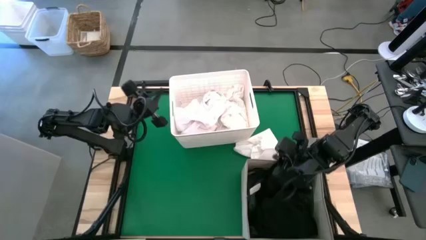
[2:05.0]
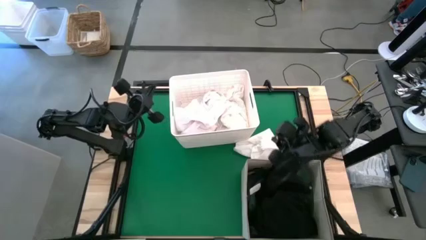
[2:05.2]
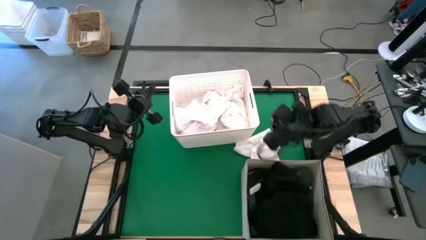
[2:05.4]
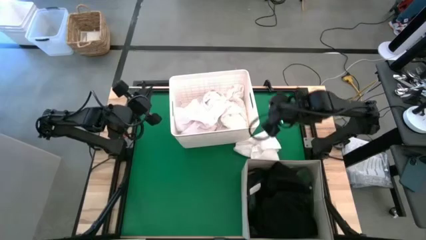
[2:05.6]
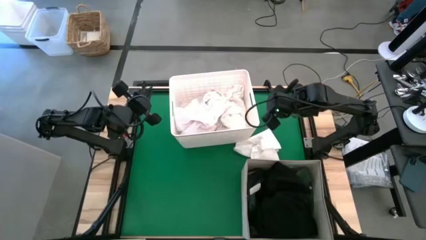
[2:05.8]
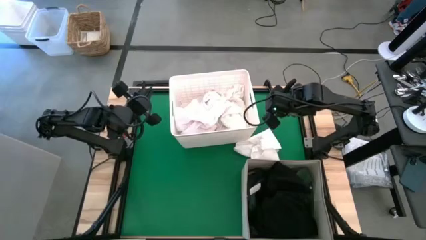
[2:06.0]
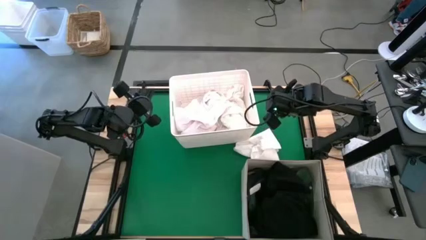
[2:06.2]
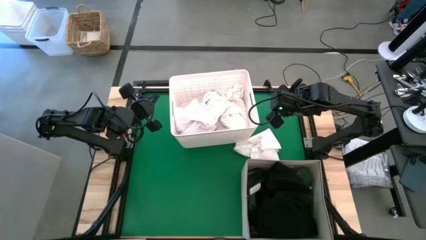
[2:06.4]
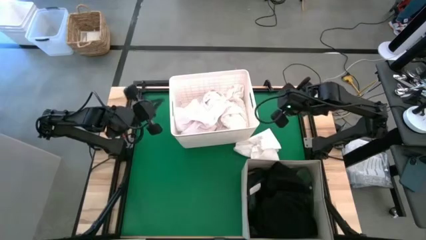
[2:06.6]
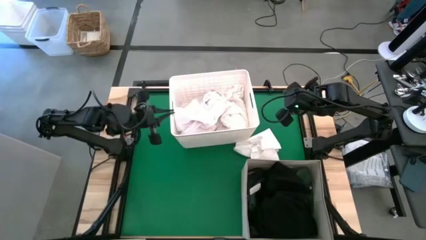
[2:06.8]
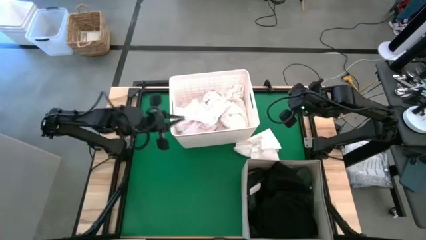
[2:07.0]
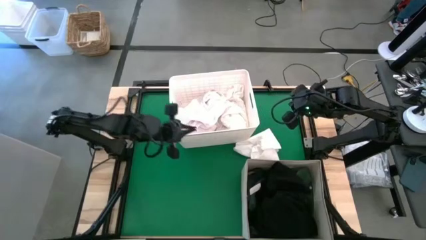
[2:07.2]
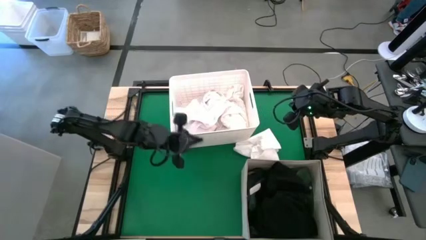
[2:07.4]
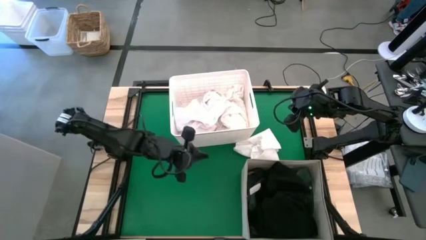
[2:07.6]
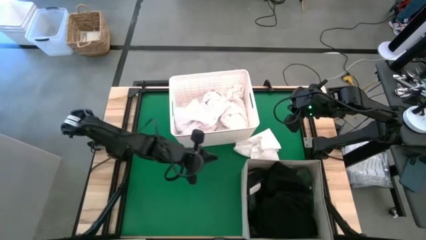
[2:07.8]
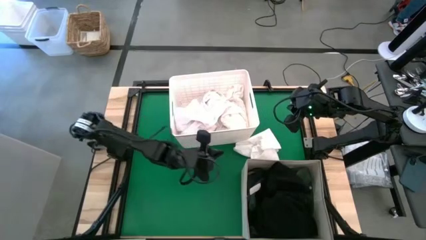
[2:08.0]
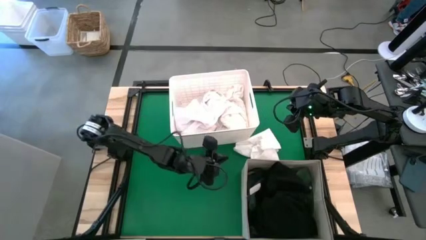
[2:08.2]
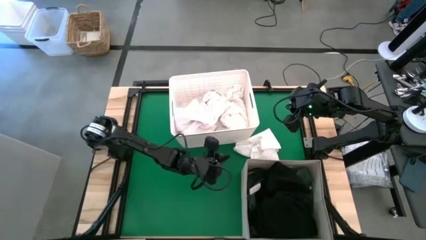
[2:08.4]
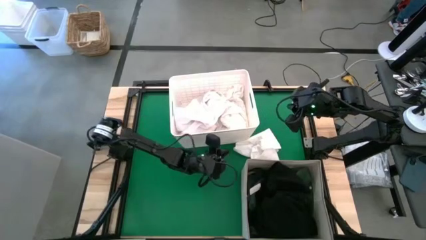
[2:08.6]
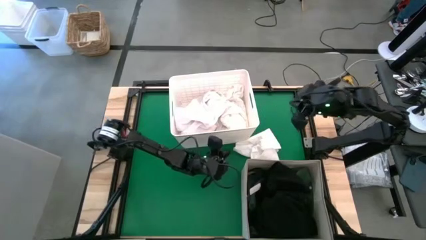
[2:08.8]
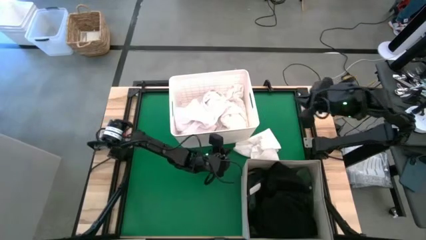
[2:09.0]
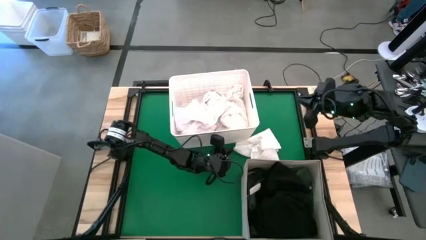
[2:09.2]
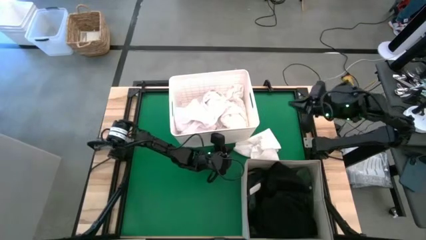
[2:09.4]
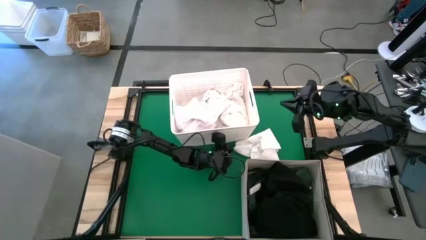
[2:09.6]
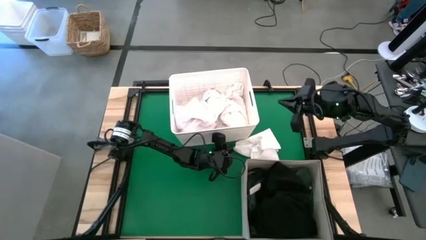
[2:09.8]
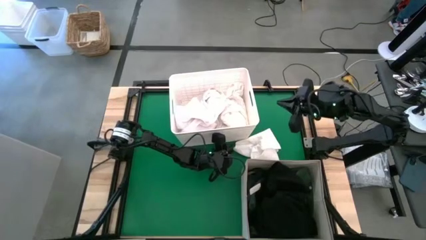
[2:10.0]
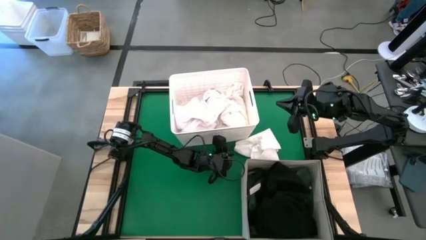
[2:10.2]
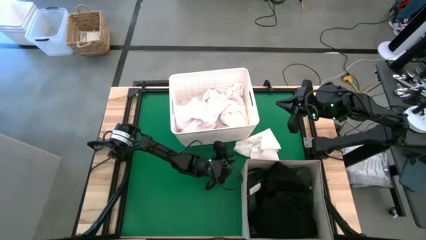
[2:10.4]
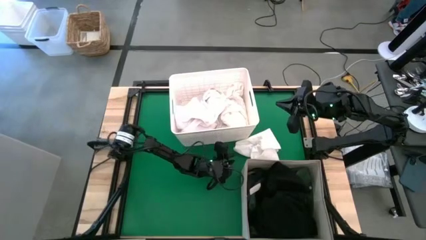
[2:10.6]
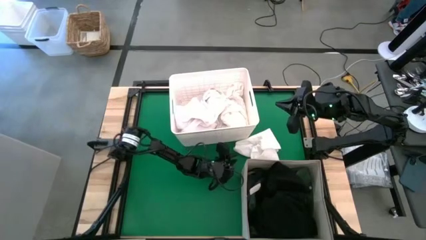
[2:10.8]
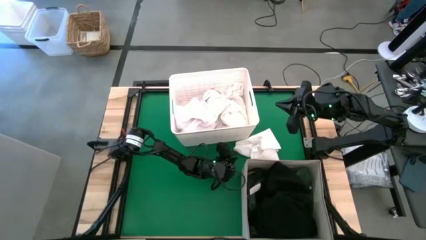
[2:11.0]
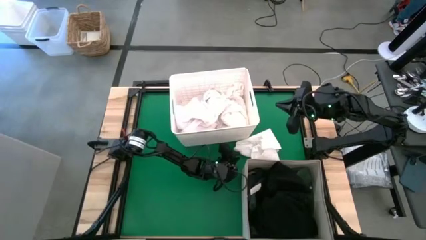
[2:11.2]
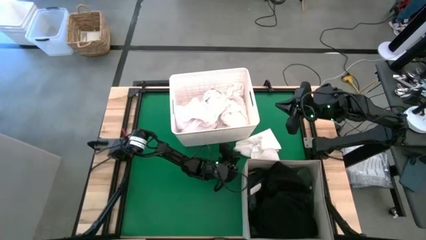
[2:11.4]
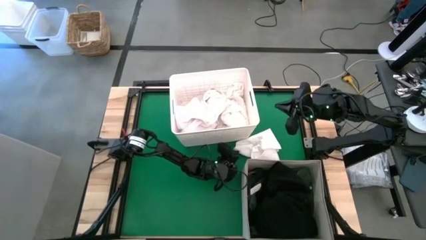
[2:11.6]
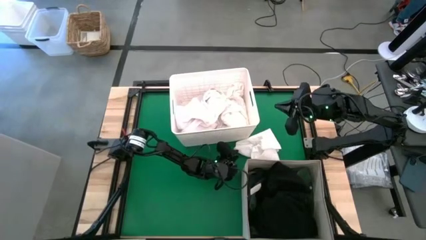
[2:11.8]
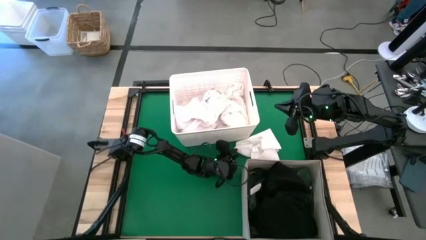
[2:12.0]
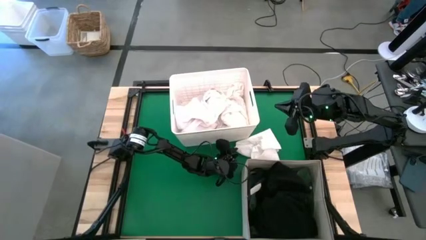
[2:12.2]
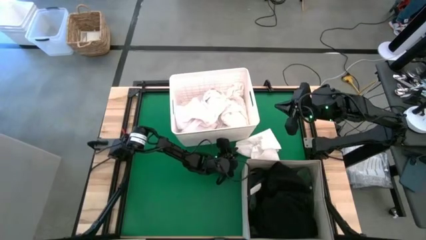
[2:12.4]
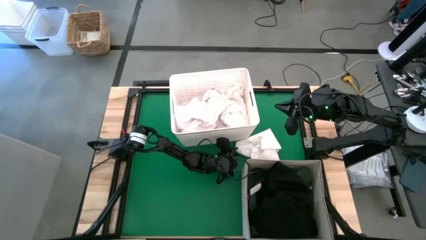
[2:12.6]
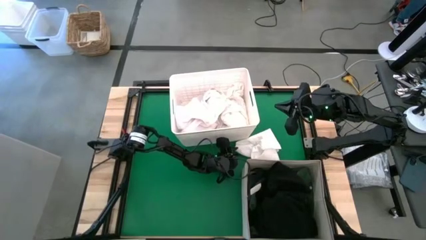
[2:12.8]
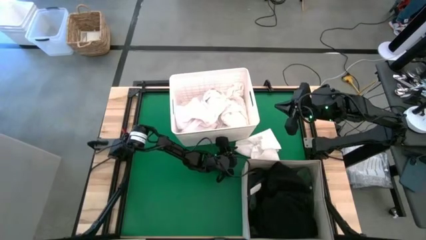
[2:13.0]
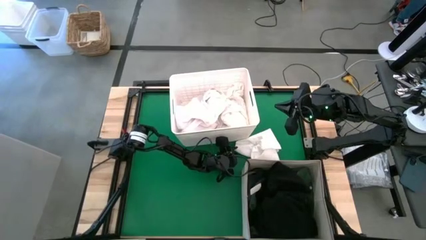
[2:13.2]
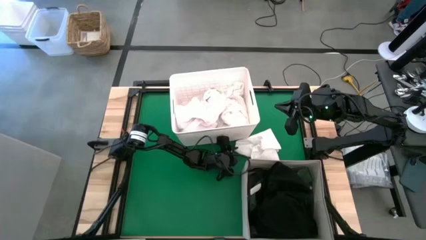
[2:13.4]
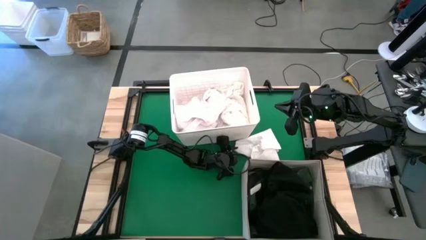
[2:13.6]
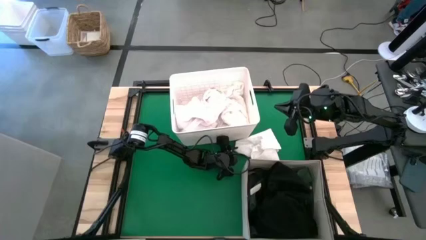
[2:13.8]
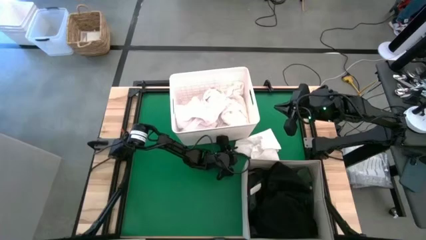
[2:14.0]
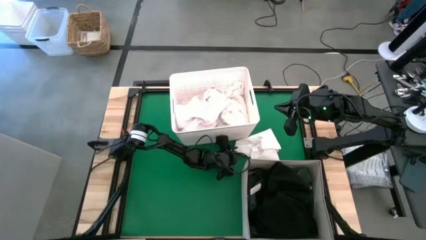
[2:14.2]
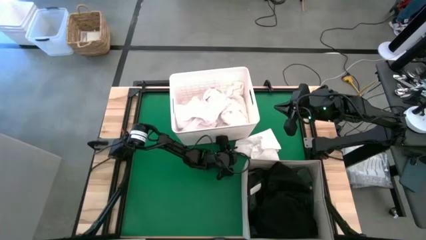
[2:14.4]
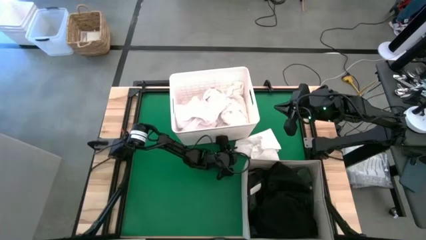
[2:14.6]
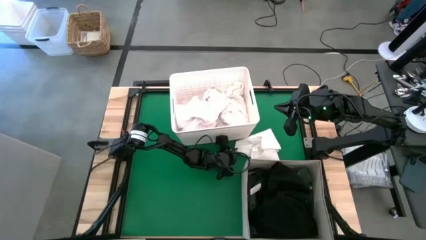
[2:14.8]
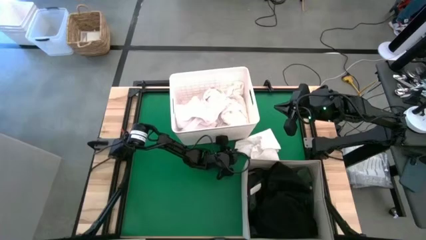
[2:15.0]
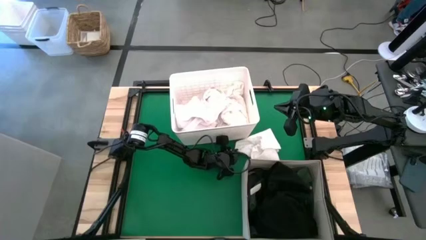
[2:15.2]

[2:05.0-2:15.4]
Put the white cloth into the white plastic storage bin
